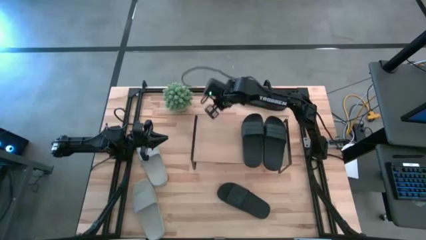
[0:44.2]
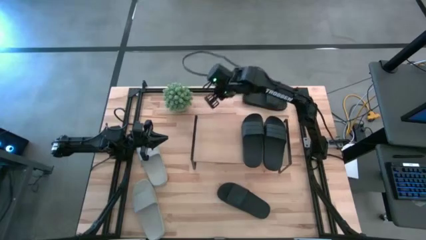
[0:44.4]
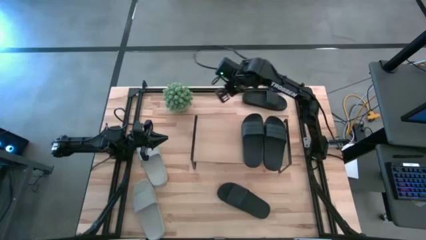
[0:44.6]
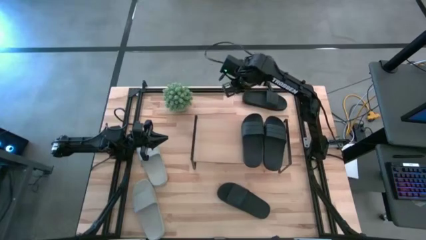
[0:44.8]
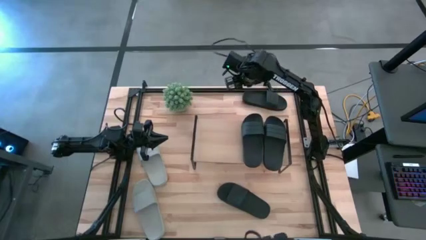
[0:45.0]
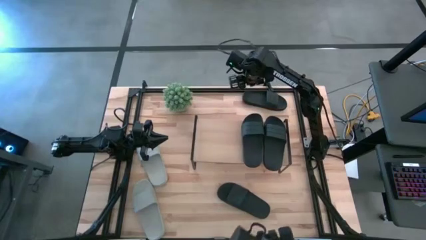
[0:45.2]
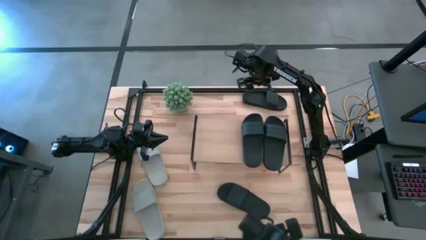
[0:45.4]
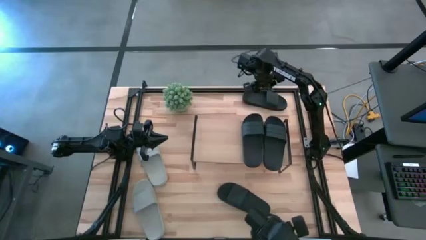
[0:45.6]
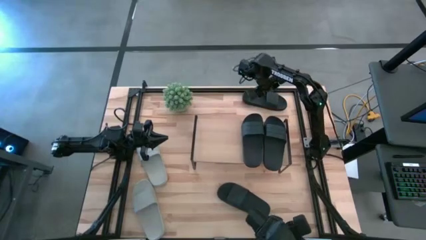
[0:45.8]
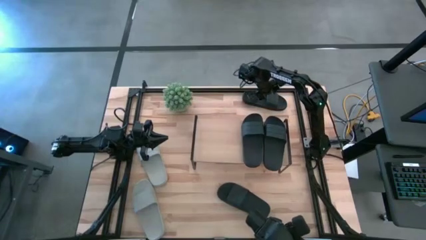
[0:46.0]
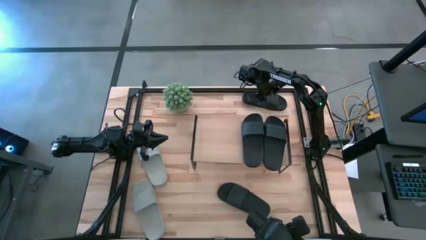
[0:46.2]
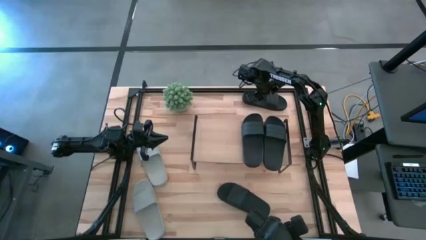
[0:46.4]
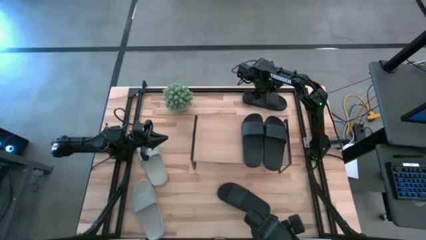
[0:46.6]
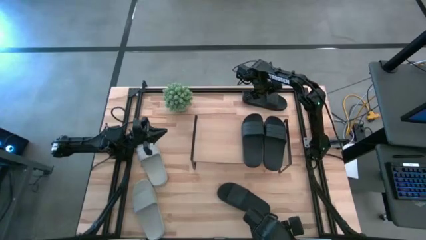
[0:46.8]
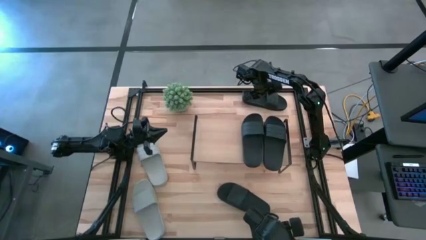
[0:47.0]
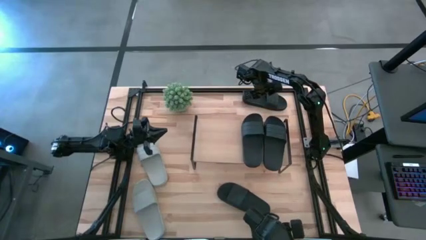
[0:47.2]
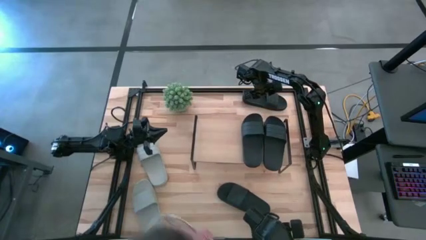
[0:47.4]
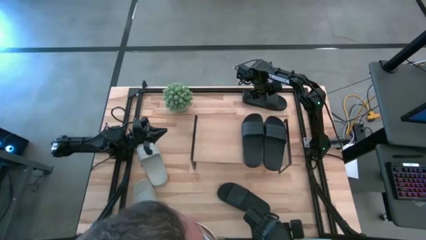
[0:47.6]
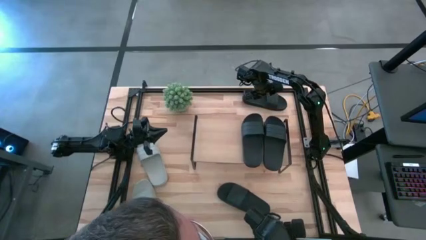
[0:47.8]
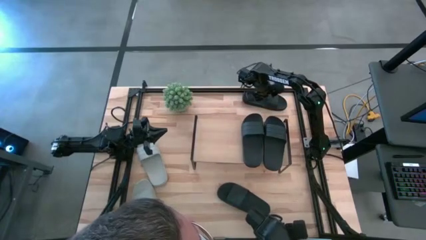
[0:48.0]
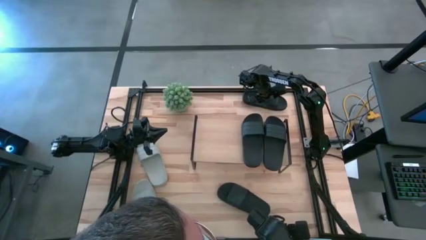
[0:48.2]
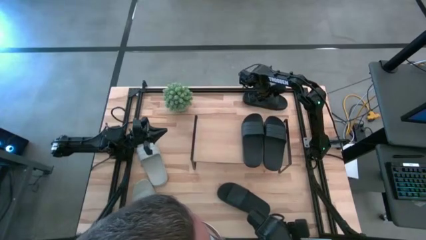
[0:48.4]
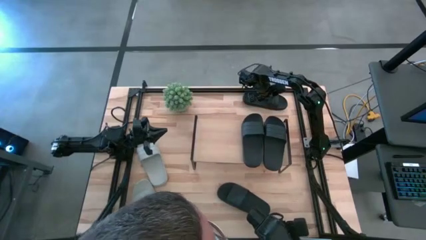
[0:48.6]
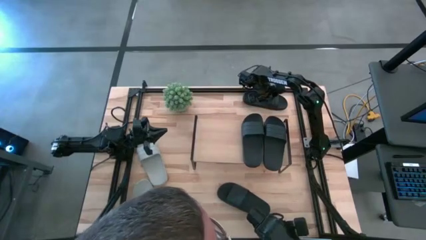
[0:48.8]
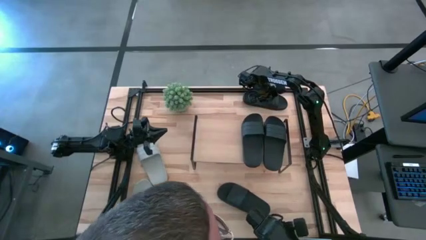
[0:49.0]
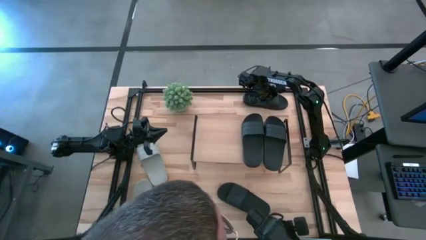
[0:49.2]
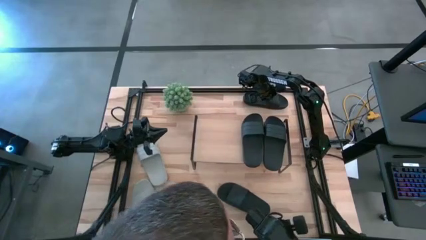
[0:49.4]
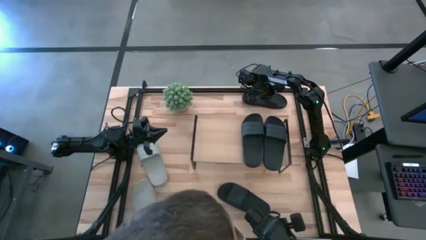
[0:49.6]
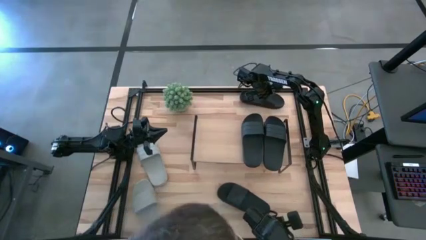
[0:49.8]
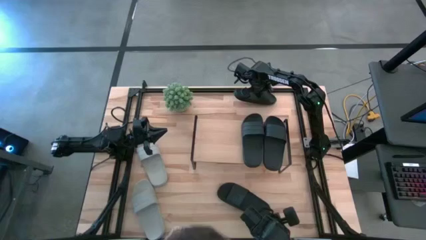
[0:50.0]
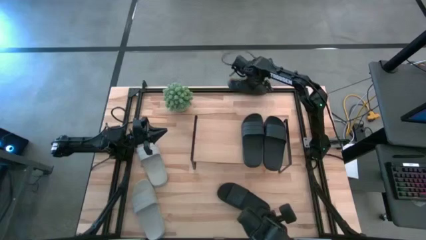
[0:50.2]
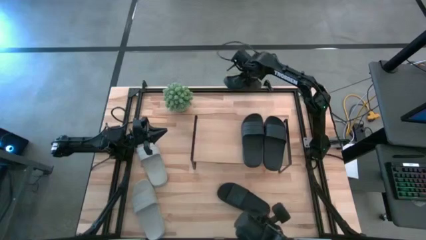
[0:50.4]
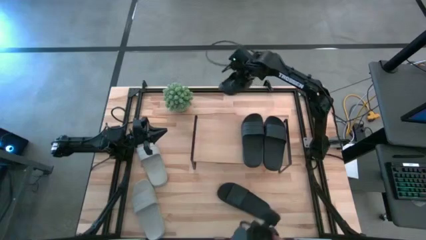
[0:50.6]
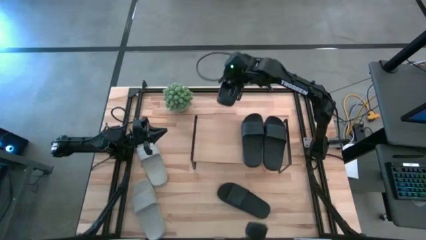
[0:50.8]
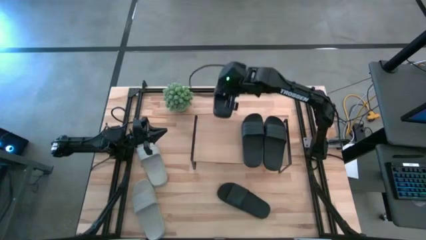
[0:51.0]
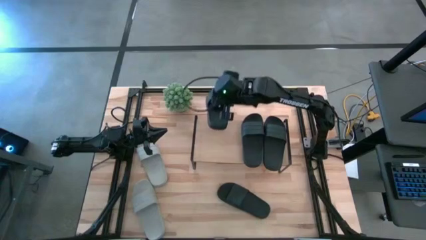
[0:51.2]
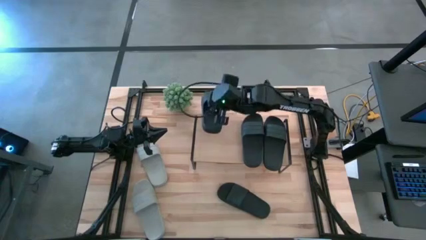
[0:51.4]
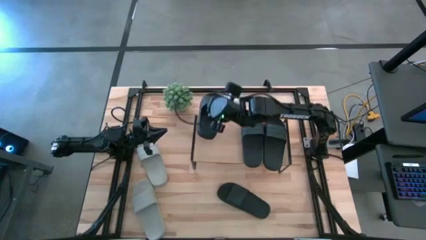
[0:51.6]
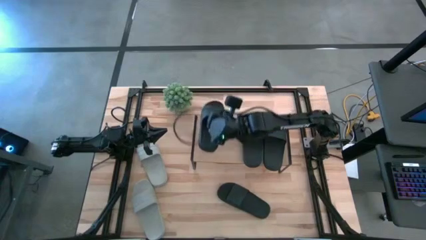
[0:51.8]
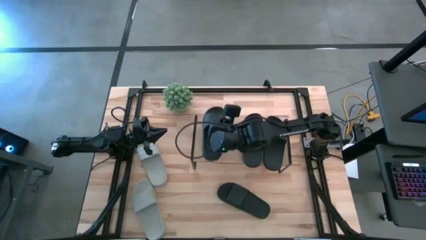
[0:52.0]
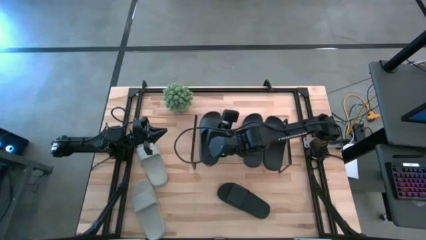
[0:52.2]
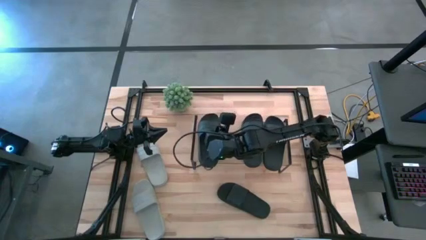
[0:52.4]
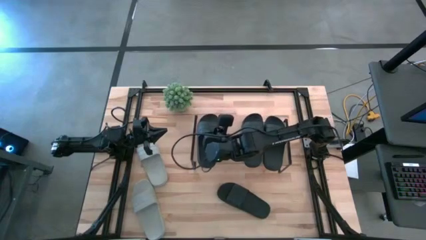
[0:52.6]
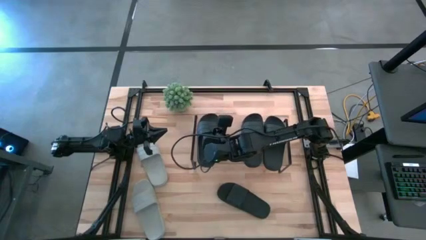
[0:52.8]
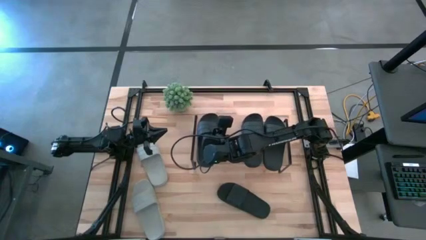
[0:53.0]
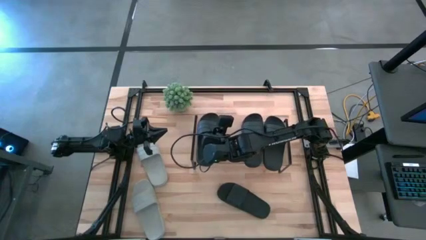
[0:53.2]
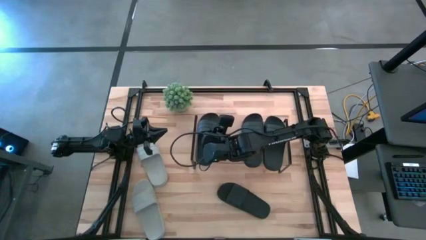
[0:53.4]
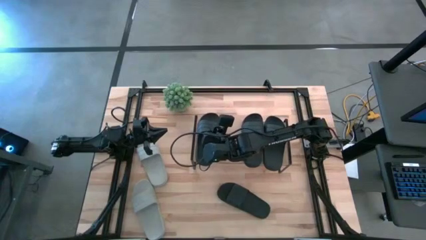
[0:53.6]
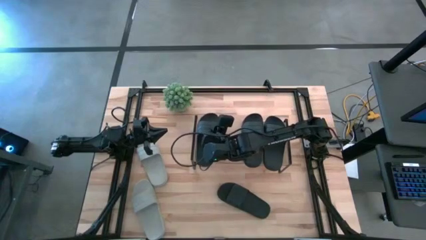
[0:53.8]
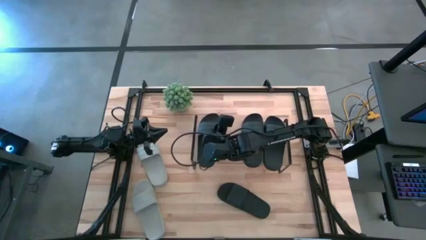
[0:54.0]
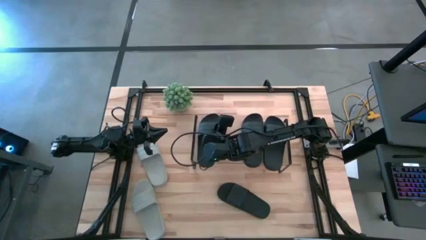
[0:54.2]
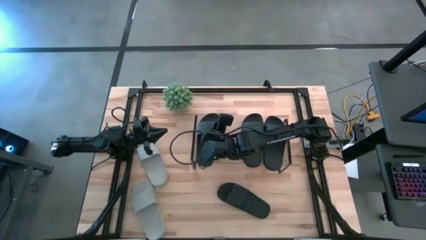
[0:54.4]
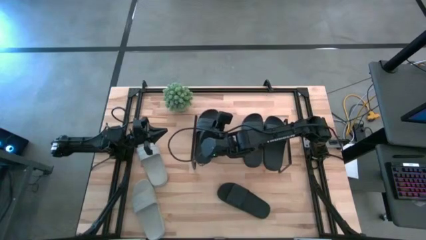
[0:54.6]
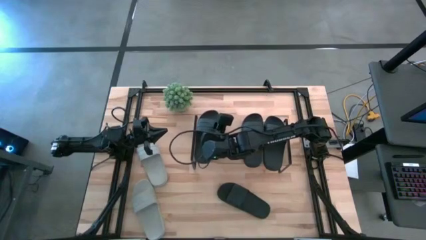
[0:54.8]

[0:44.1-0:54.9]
Task: Pick and place slides into the shelf
Put the black slipper on the shelf
